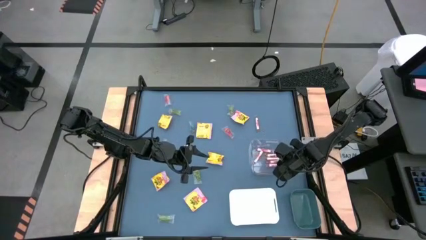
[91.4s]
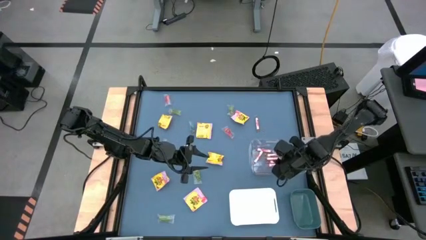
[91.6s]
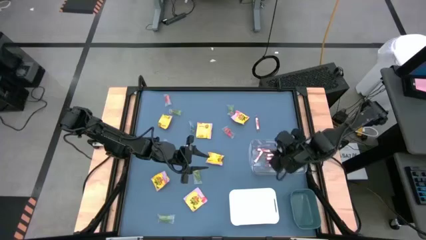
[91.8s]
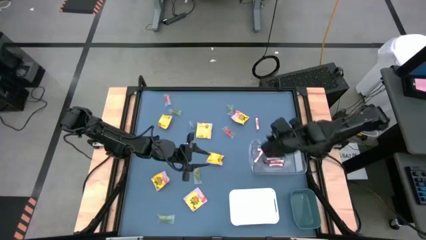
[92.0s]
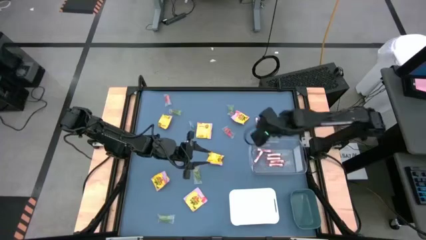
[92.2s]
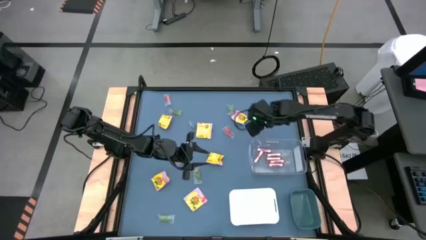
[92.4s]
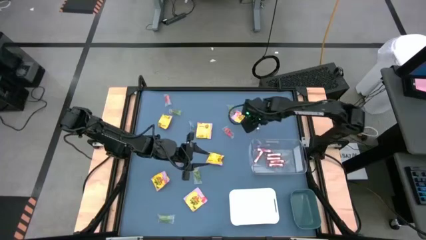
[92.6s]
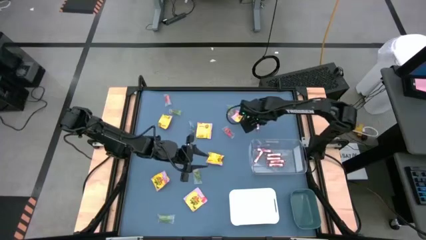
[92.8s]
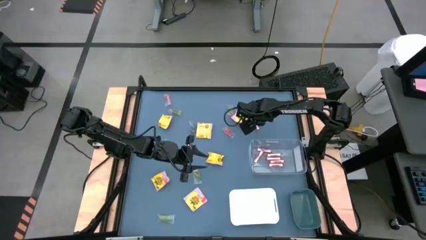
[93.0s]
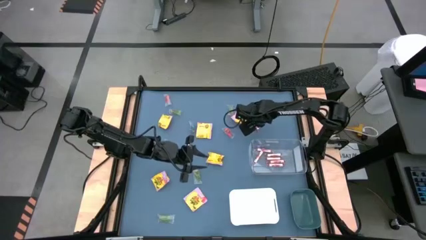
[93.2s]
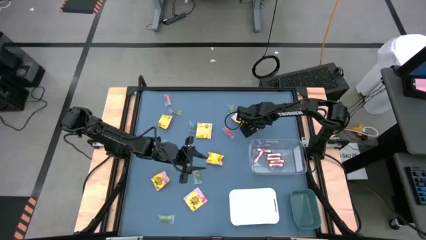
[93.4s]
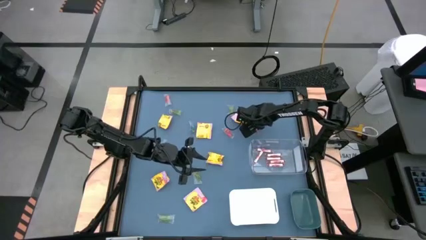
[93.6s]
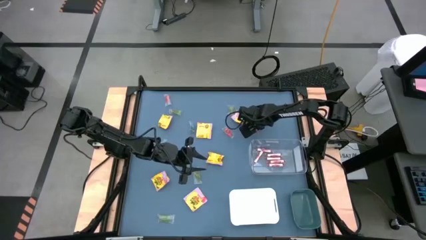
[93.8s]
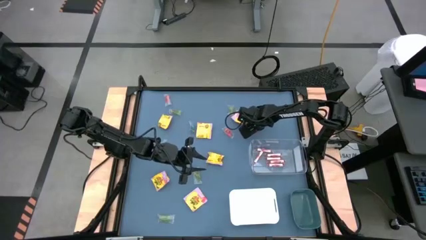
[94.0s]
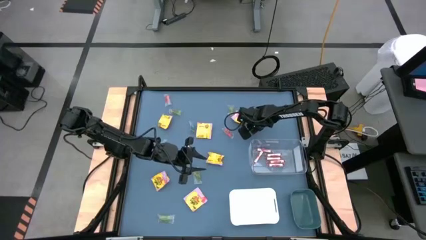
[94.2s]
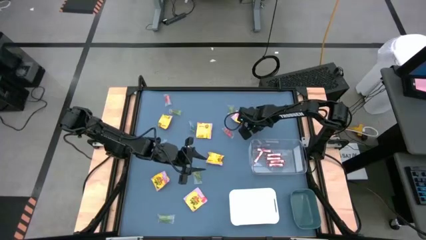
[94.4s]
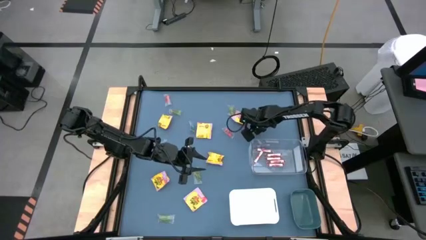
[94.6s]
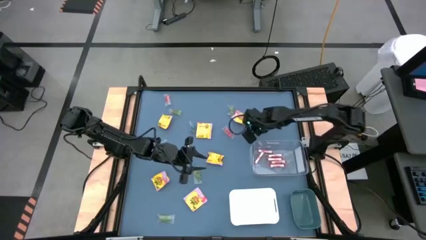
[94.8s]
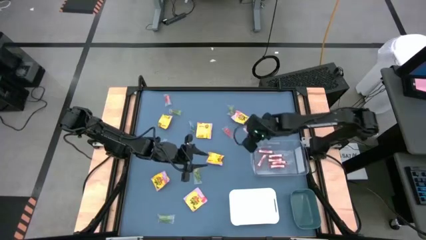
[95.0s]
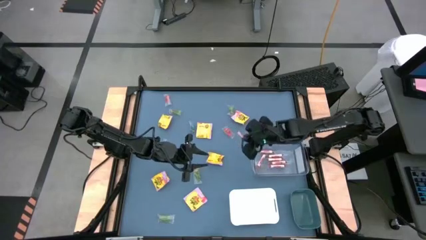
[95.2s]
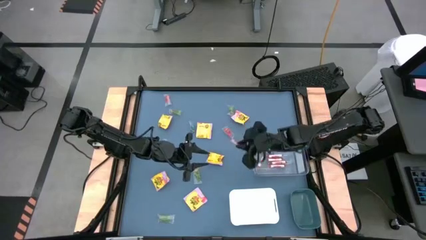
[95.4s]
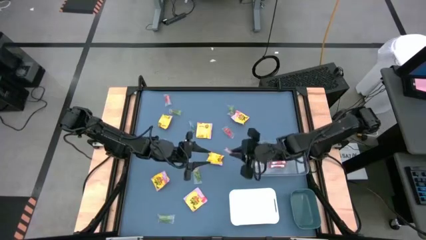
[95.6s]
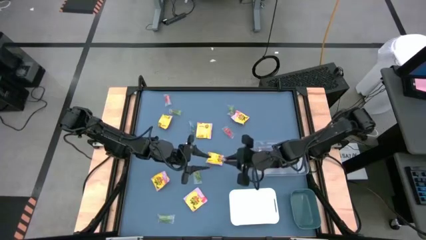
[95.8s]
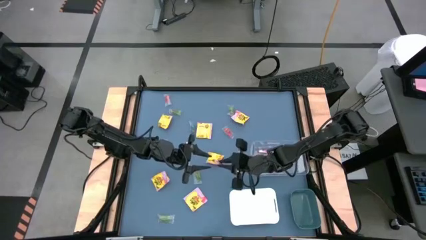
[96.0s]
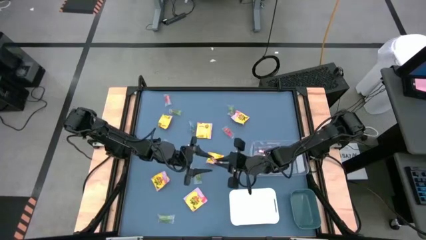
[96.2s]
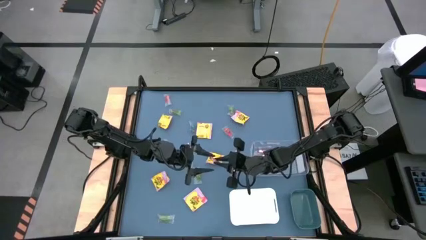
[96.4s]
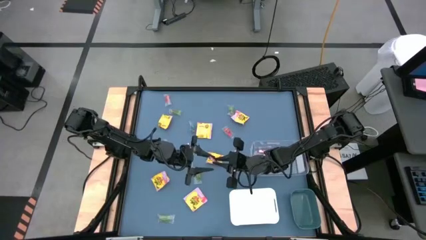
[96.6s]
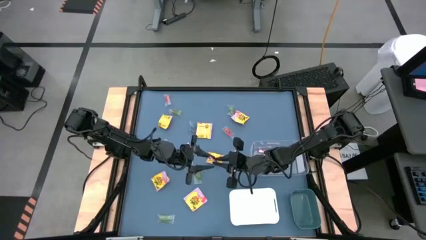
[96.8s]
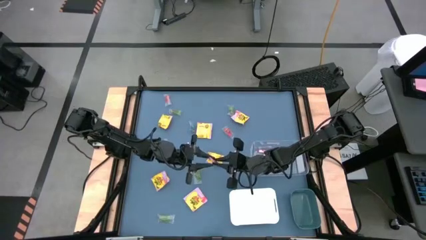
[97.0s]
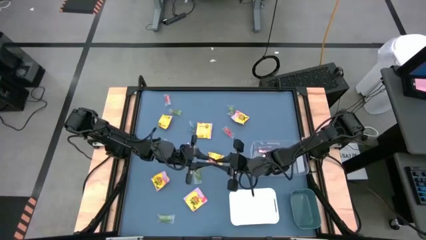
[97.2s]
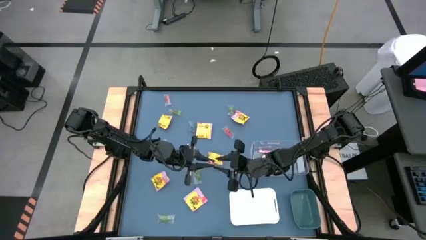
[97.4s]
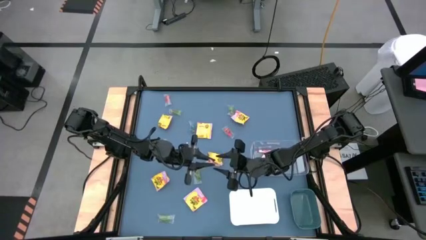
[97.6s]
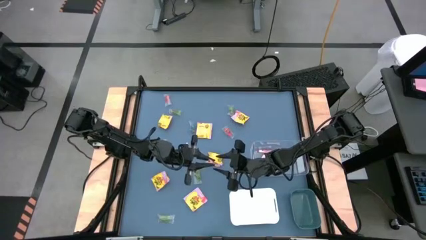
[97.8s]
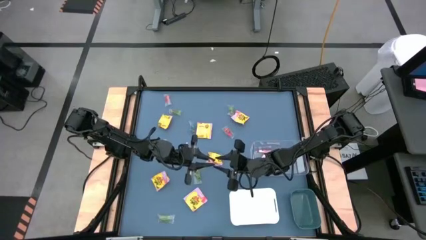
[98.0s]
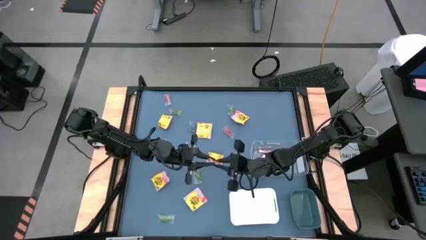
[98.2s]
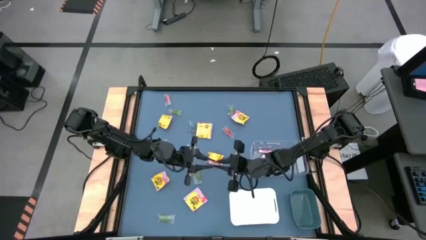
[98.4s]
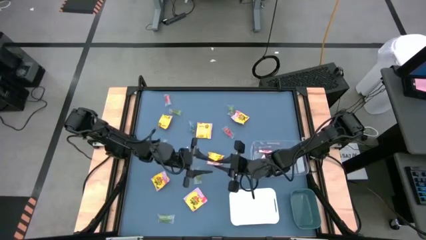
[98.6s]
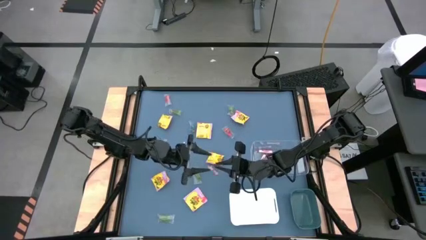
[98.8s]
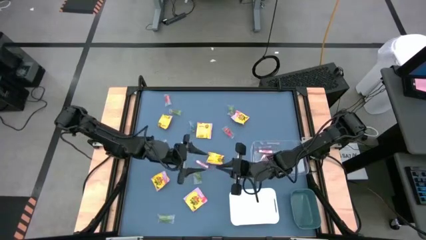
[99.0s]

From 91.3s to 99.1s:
Task: Sort candy
Put the transparent candy roll into the transparent bin

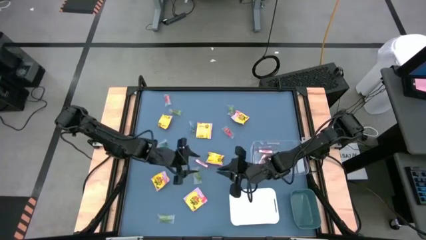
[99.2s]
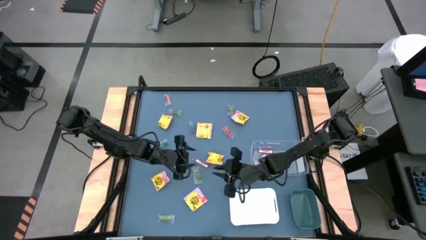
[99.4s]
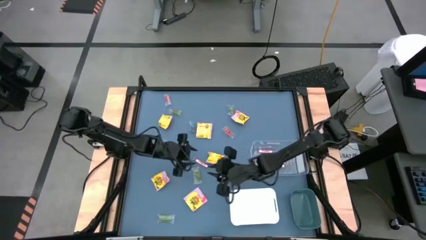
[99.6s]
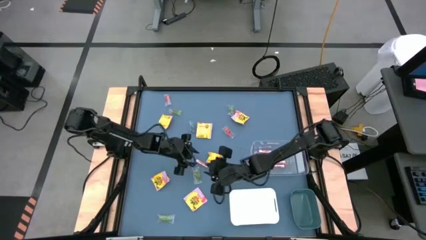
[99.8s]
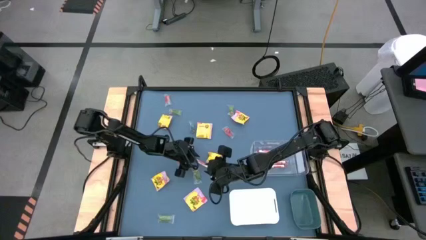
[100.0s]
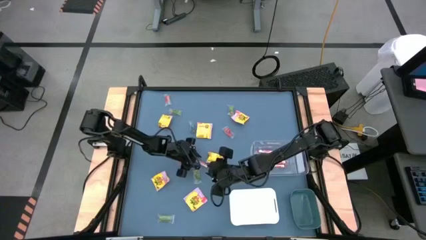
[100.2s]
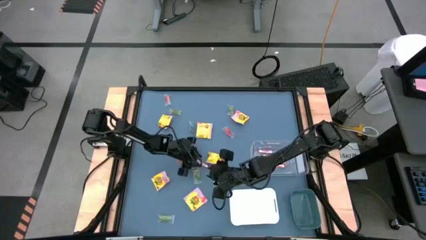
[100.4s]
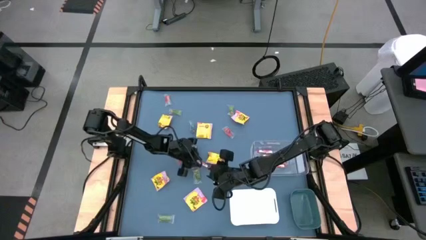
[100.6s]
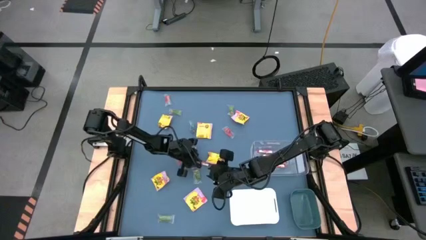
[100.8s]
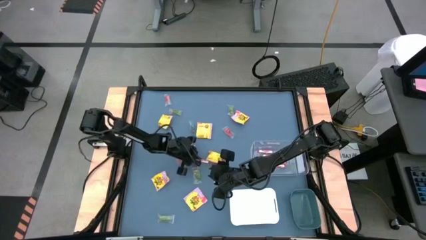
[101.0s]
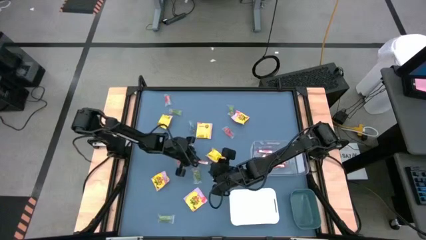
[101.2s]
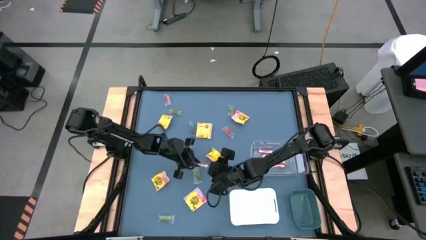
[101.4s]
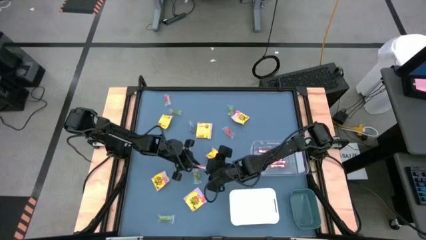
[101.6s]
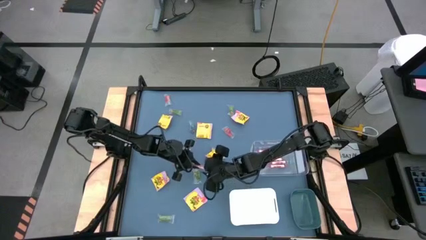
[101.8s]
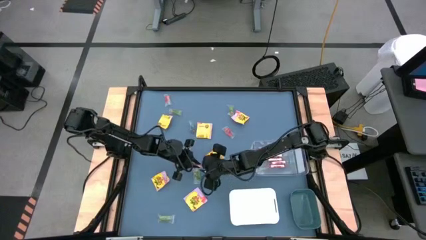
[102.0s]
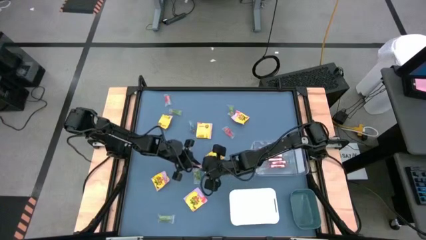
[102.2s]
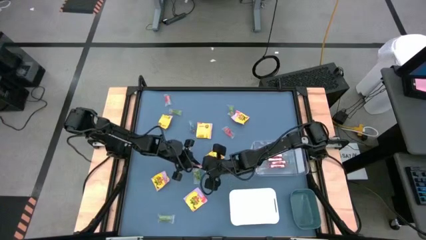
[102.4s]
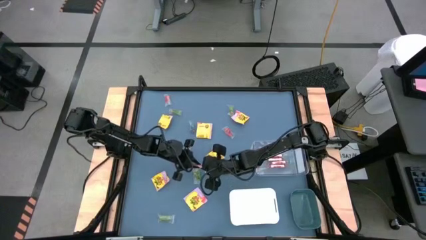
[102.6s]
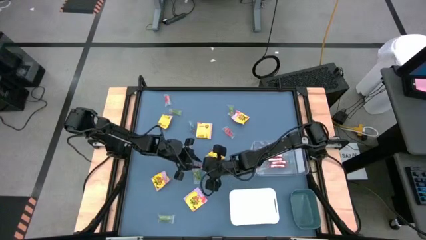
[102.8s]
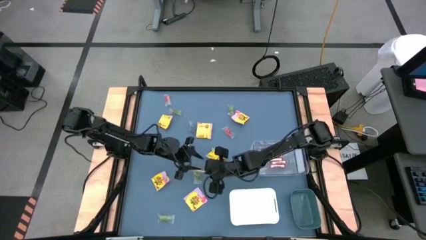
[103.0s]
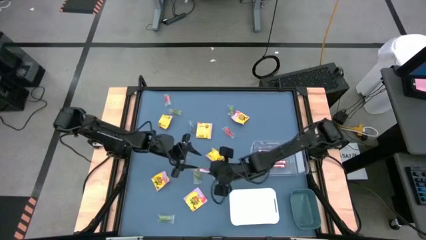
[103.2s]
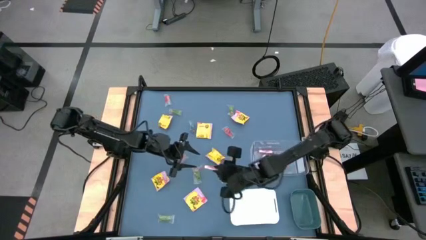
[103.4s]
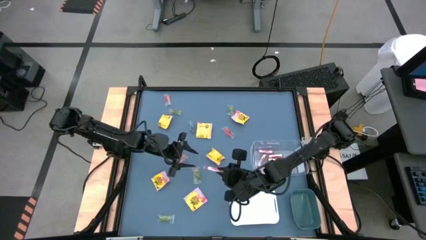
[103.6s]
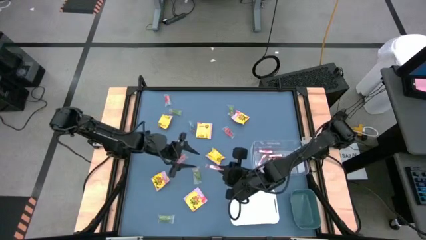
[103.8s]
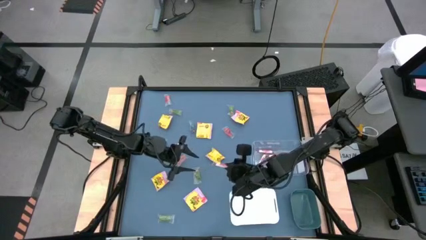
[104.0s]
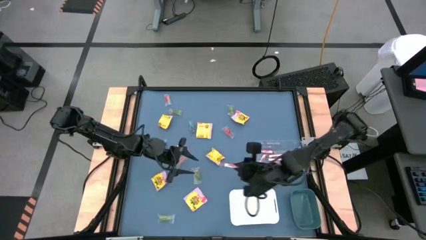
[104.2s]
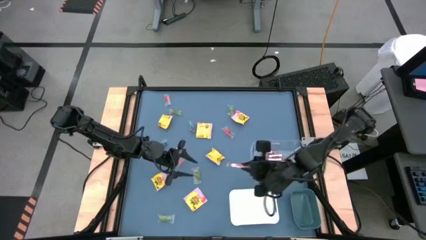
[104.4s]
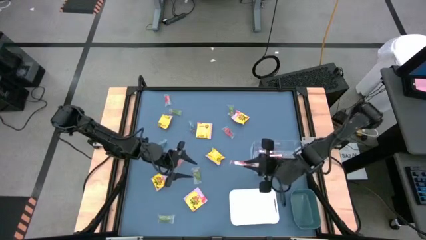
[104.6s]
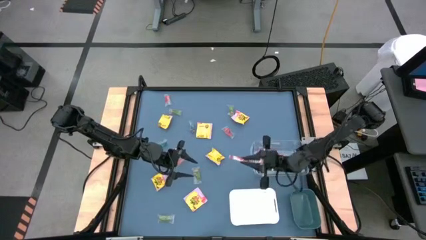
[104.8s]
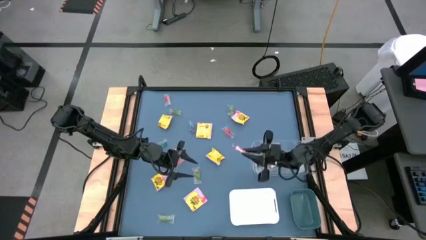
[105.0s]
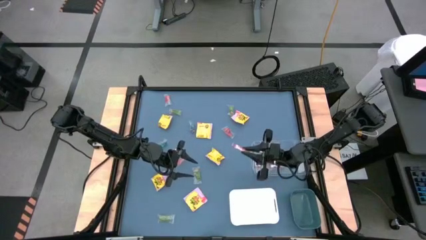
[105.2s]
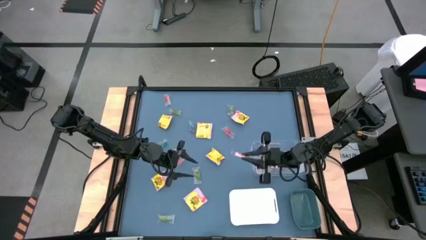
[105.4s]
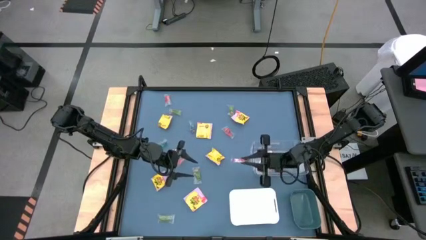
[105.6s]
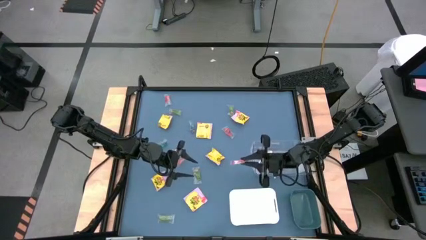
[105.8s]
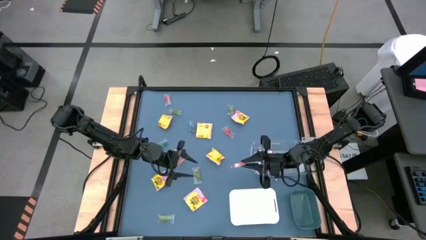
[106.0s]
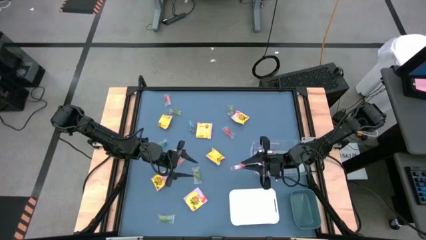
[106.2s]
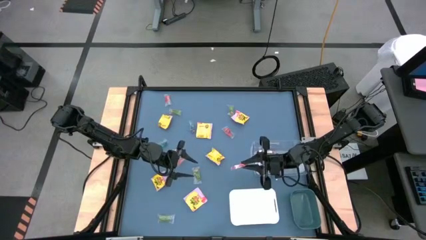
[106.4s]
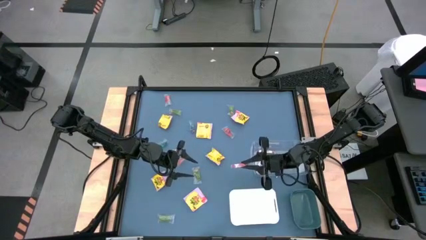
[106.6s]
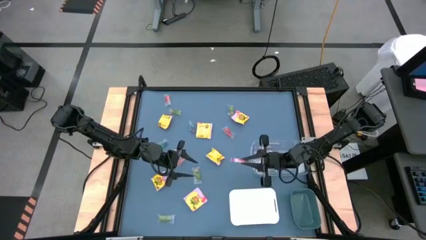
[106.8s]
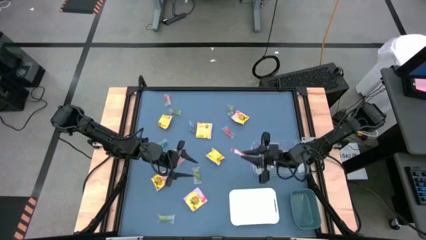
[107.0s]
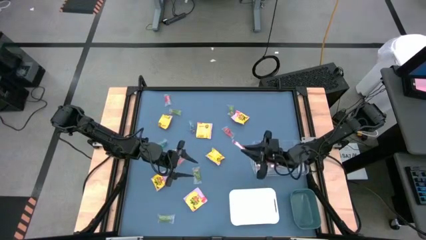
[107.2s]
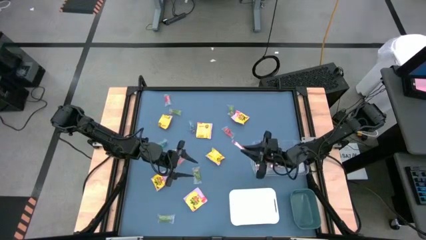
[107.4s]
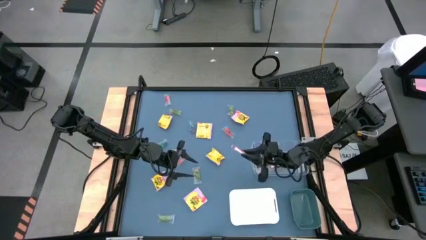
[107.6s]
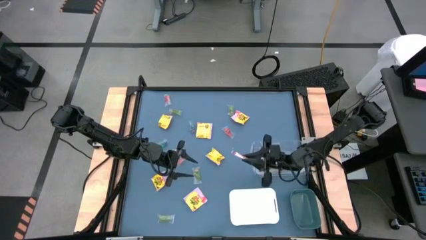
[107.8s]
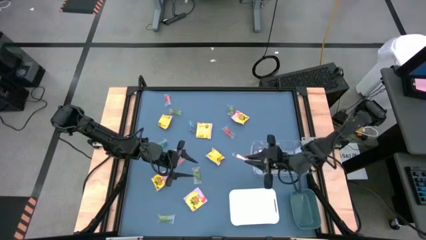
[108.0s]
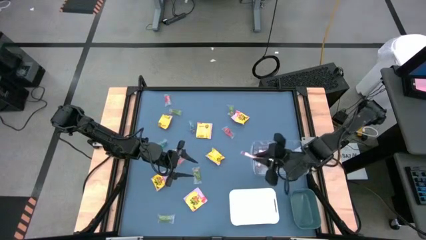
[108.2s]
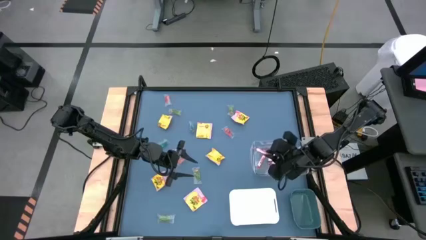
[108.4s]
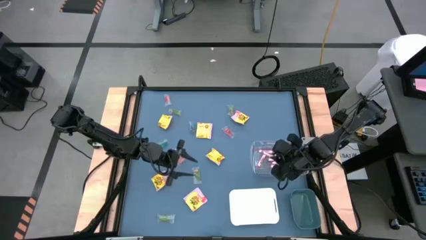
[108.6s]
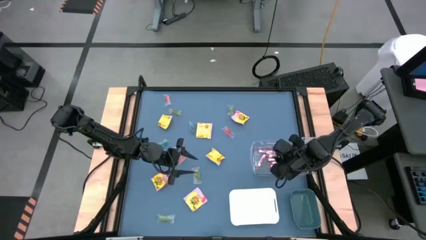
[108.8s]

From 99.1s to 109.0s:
Put the transparent candy roll into the transparent bin
